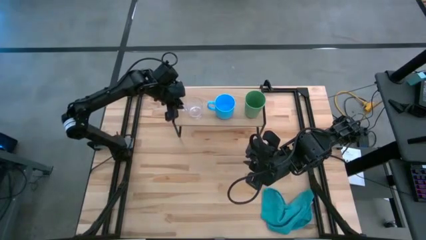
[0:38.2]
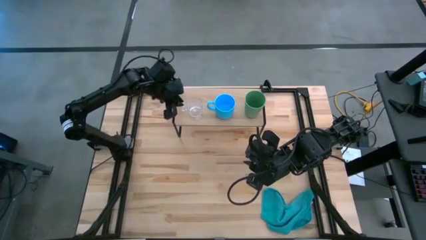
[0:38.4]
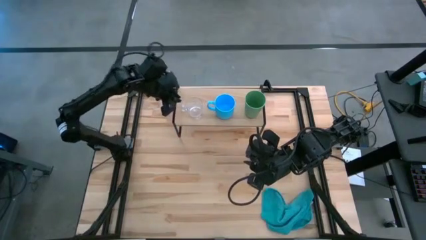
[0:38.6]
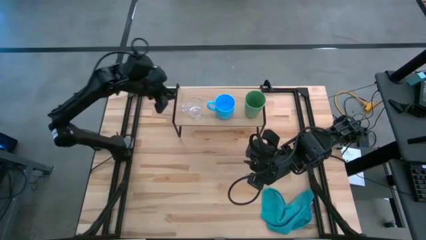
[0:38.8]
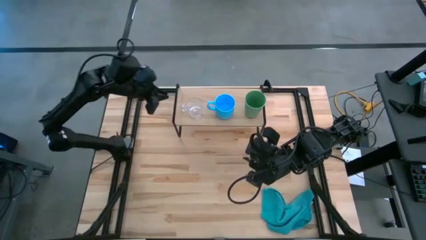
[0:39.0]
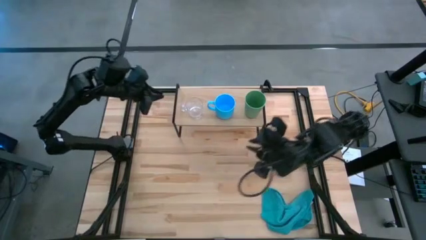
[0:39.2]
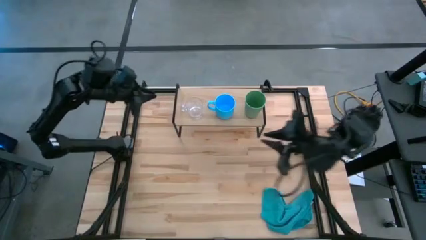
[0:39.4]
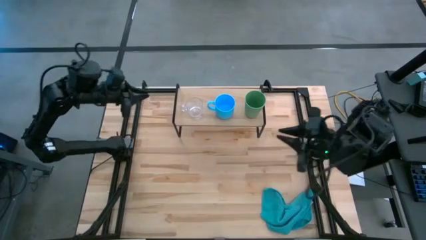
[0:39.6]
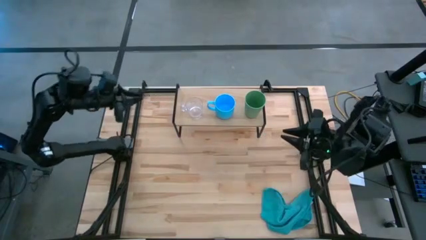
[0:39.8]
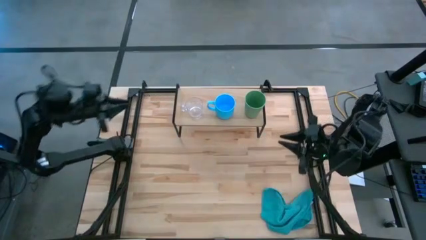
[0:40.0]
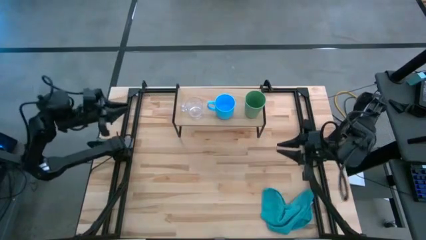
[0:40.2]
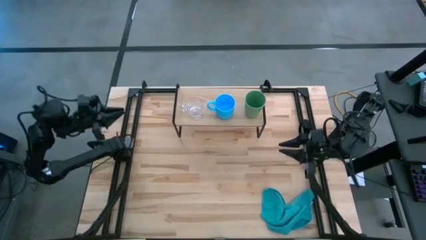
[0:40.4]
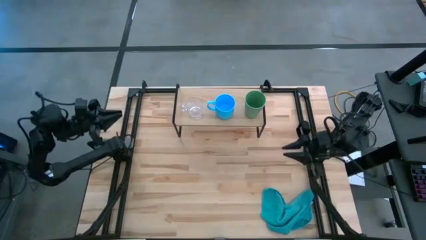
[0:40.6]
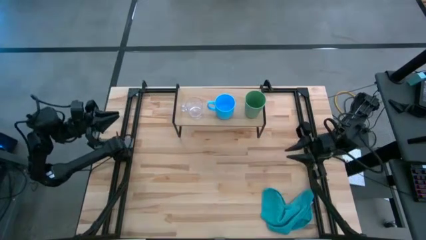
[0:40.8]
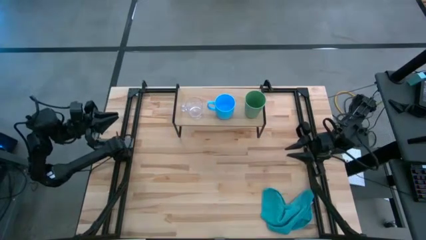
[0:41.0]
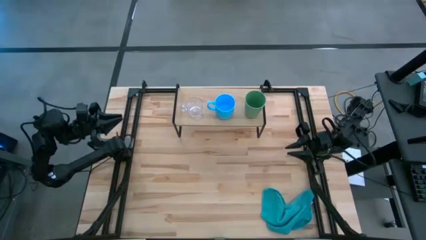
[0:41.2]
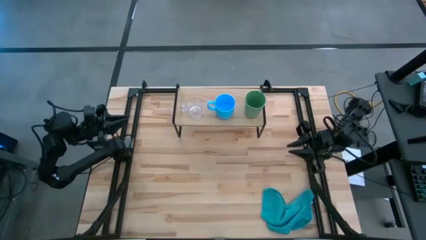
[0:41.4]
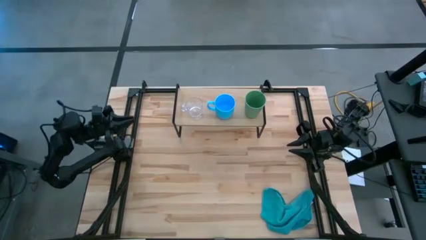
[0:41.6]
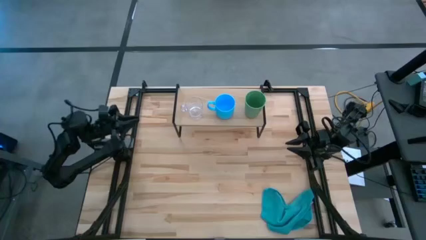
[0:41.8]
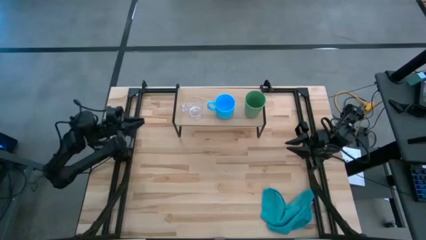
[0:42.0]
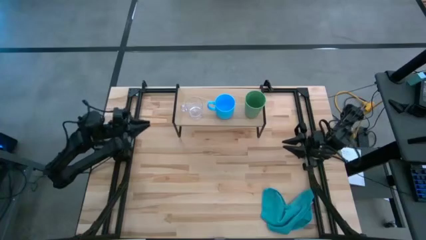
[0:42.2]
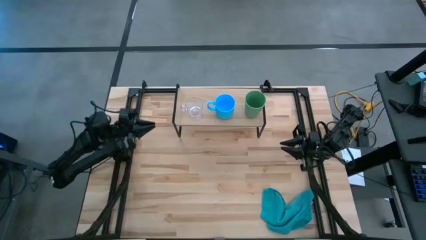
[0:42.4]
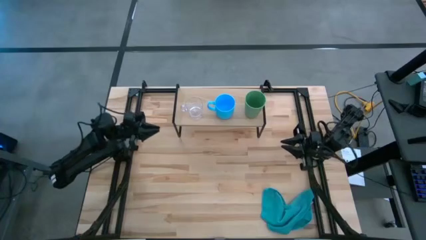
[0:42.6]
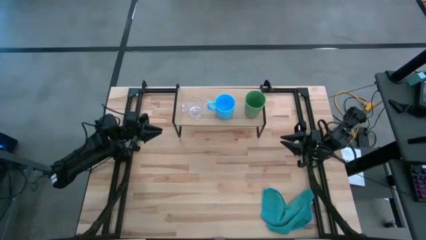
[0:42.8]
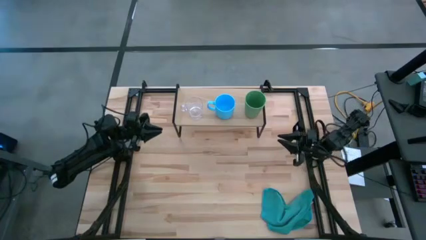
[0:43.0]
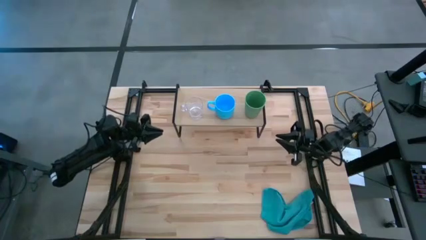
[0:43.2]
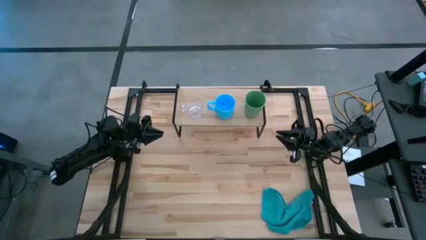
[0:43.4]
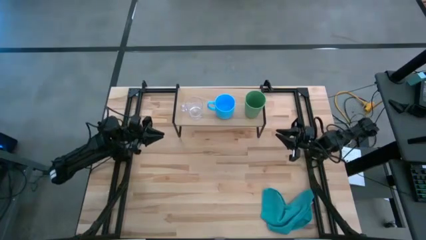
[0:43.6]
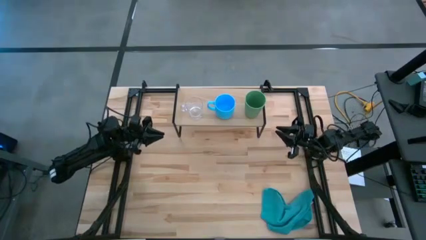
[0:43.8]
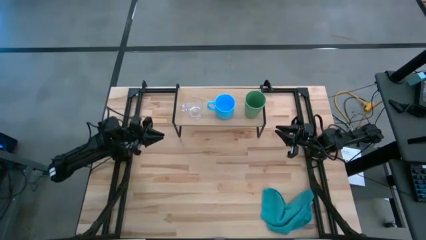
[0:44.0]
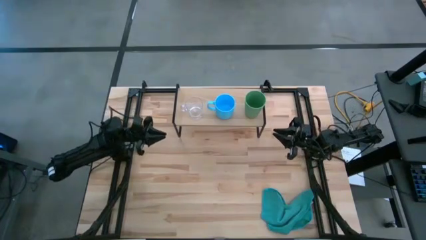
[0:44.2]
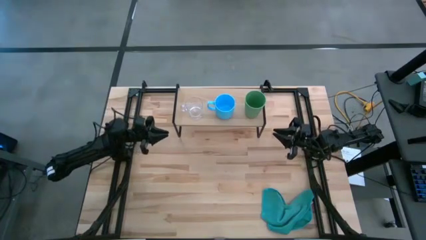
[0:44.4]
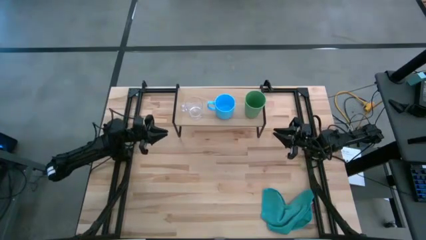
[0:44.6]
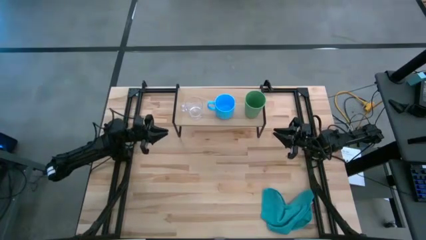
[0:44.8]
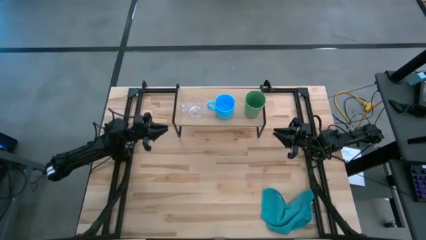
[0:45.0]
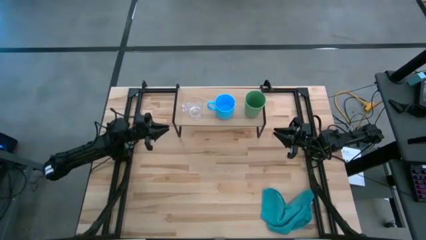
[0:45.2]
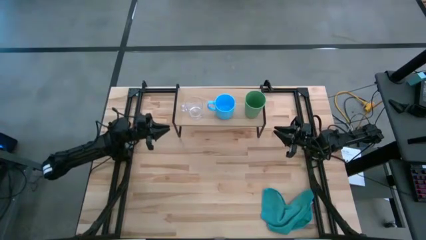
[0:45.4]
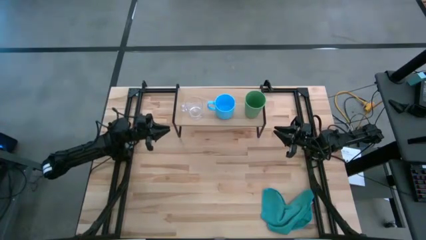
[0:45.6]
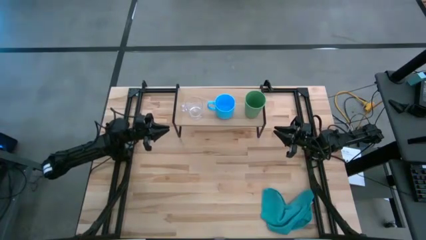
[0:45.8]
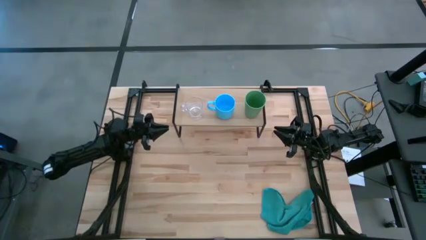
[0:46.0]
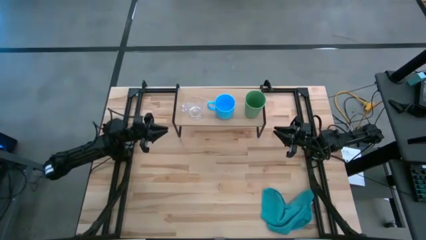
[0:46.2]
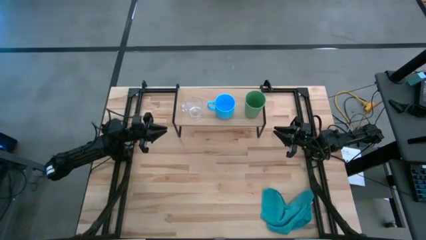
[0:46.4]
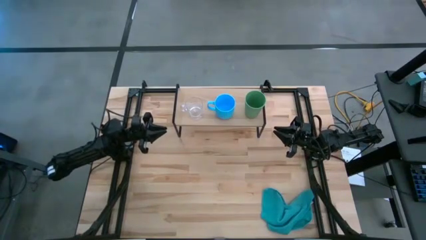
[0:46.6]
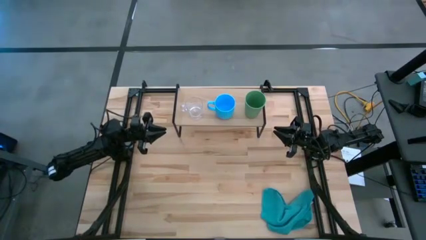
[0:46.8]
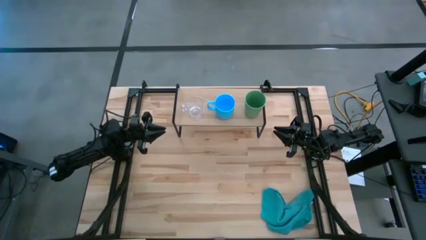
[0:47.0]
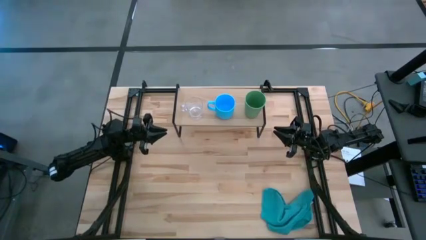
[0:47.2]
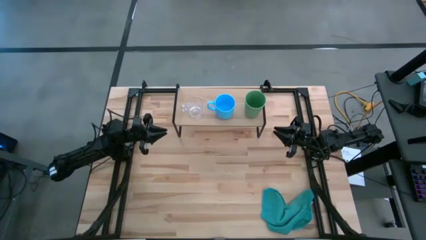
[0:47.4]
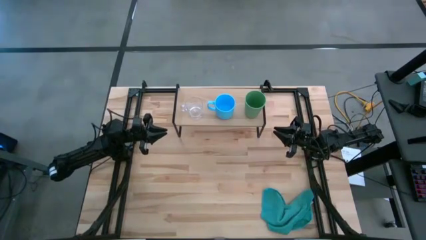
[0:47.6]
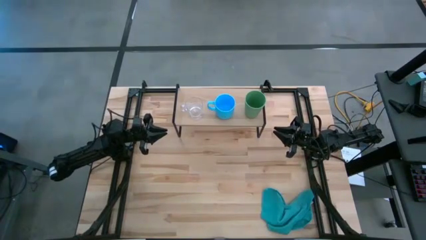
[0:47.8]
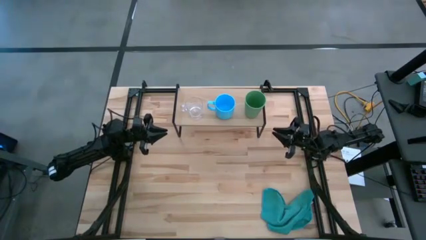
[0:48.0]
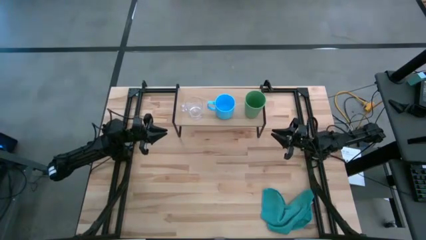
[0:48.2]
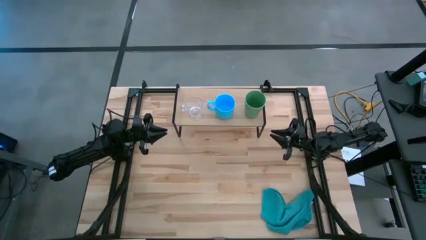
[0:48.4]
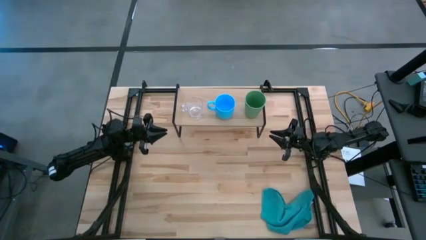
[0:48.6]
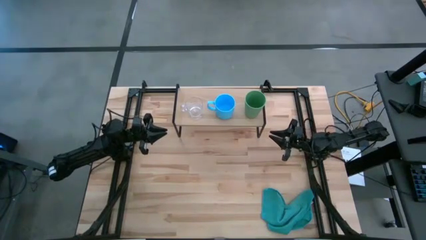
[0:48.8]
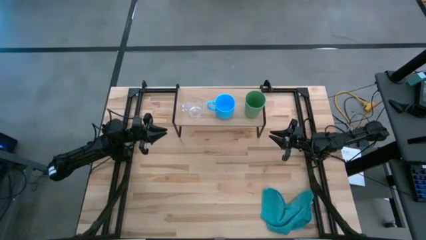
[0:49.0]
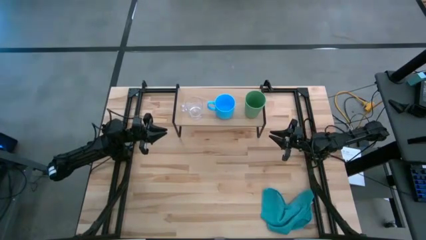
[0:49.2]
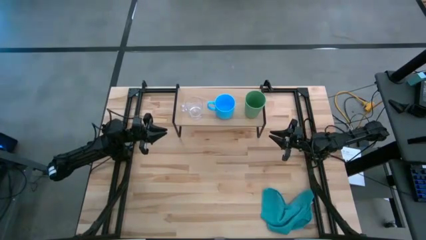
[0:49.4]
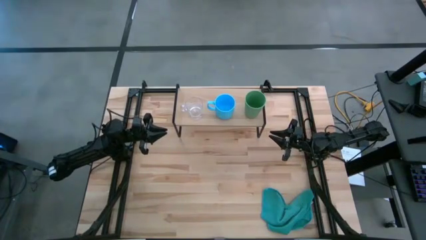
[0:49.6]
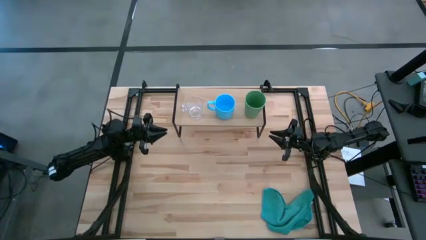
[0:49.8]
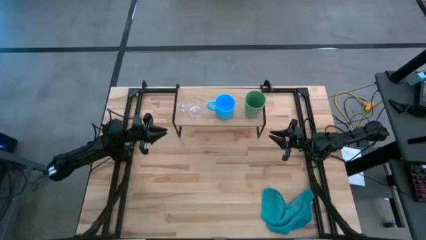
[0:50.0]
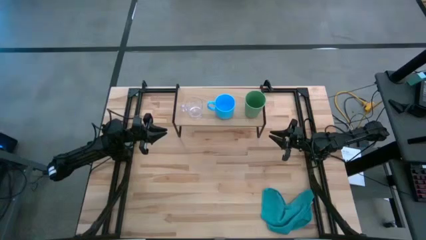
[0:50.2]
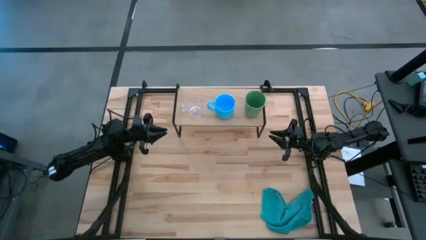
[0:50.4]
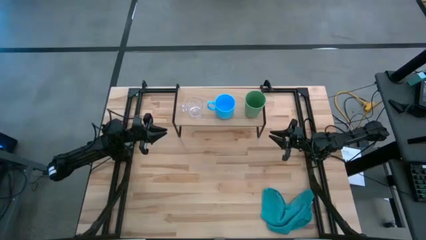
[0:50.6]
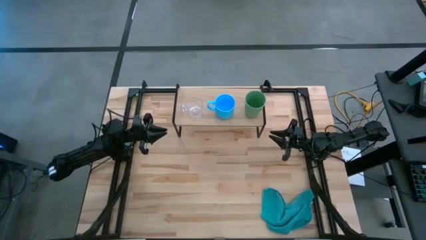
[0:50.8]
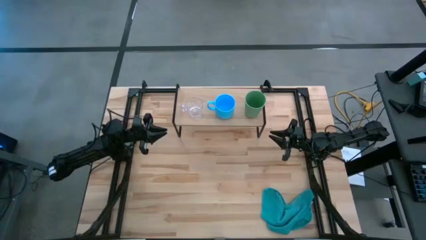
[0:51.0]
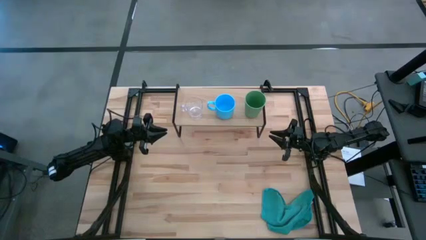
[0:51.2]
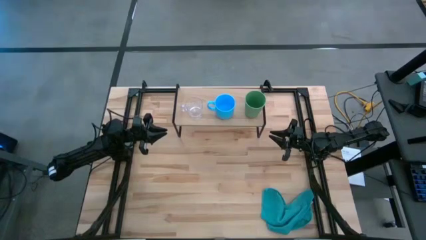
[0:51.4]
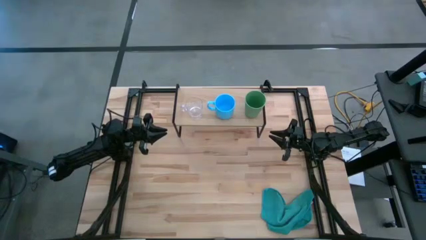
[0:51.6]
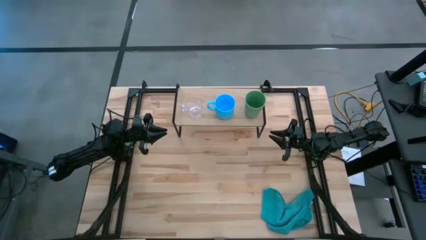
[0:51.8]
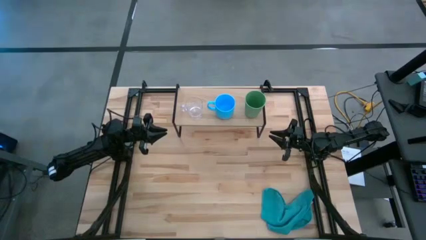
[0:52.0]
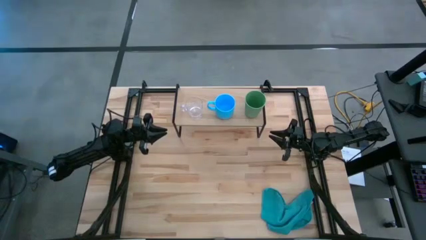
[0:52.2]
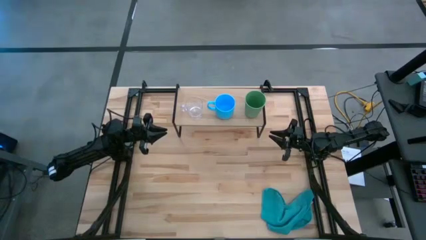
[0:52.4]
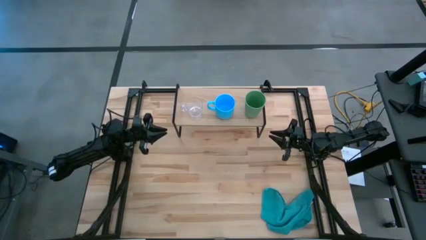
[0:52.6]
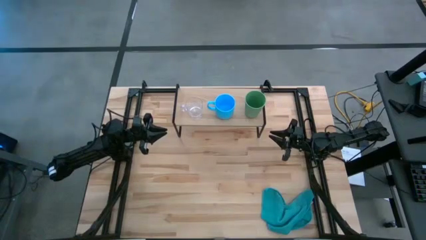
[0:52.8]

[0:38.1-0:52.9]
Task: Stack small to large cups/mugs on shelf
Return to Home Position

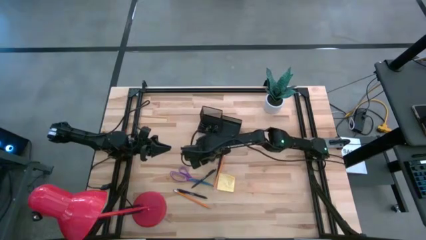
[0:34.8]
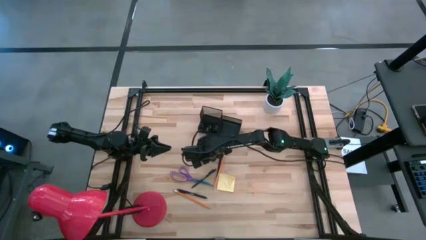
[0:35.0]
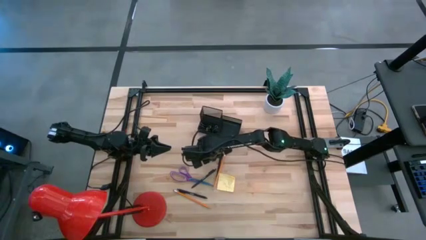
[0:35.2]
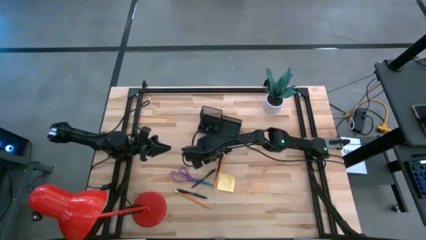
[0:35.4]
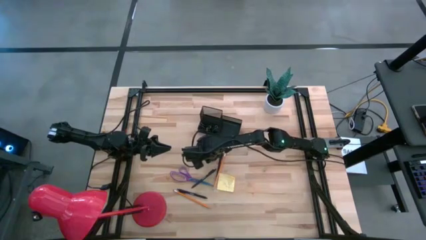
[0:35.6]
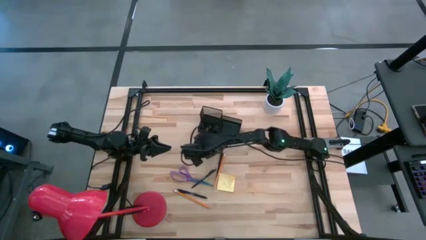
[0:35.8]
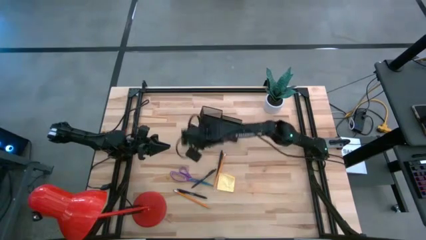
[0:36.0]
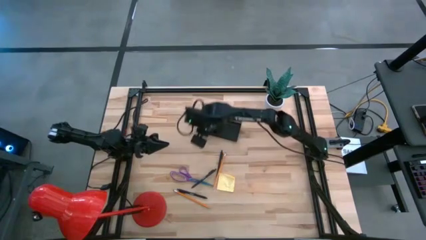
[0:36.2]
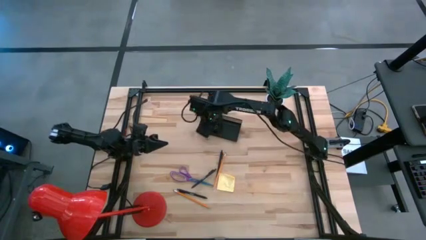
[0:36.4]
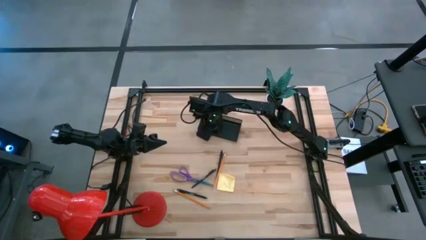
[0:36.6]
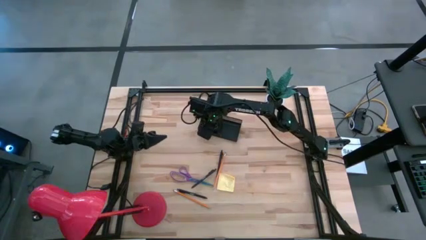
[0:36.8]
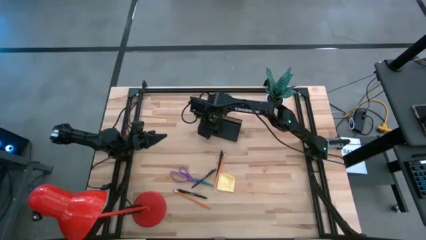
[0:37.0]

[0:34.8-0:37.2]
Task: Pick and place office supplies into organizer
Put the blue eraser into the desk organizer
